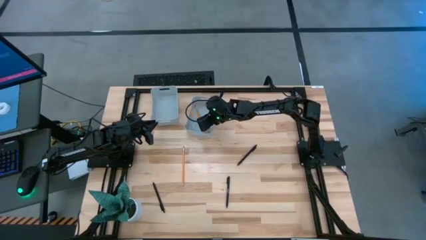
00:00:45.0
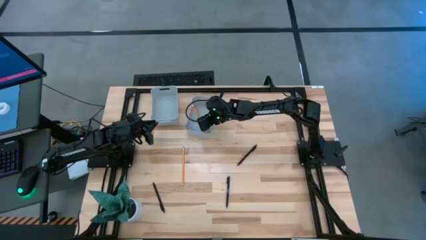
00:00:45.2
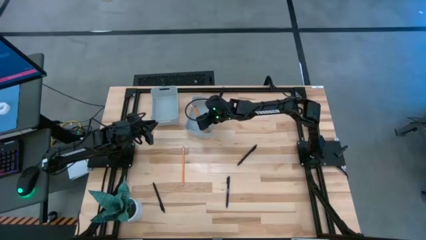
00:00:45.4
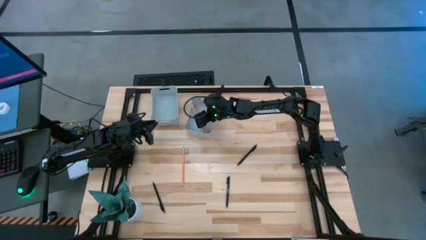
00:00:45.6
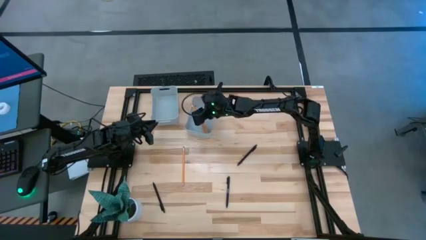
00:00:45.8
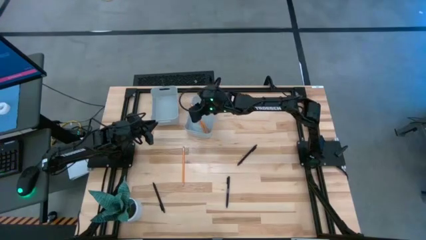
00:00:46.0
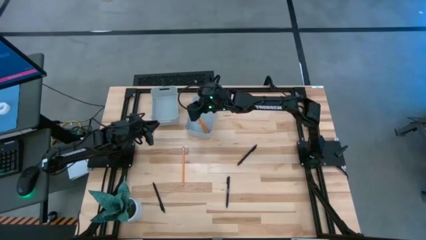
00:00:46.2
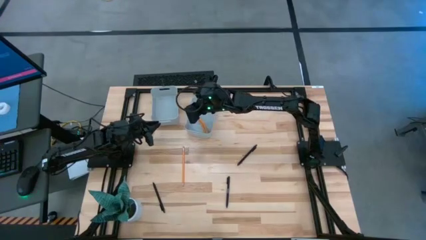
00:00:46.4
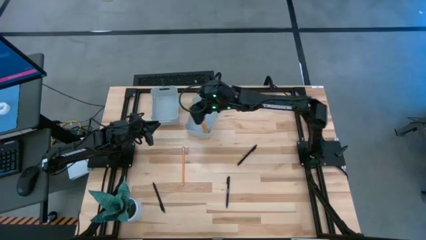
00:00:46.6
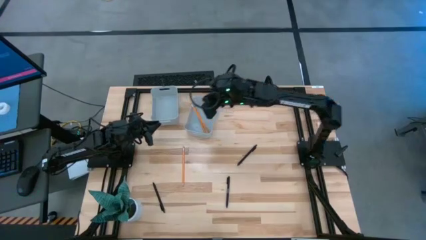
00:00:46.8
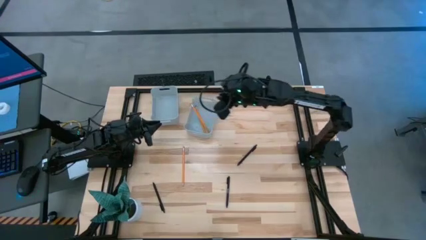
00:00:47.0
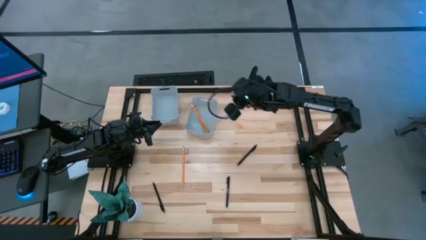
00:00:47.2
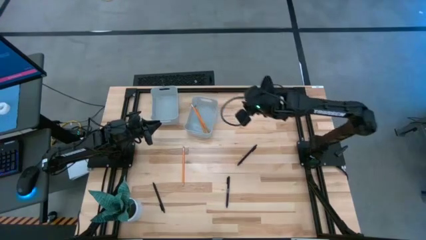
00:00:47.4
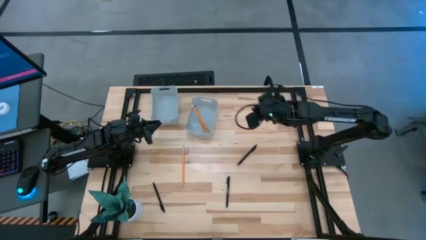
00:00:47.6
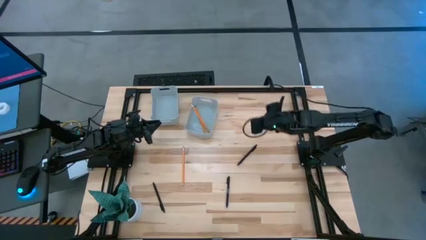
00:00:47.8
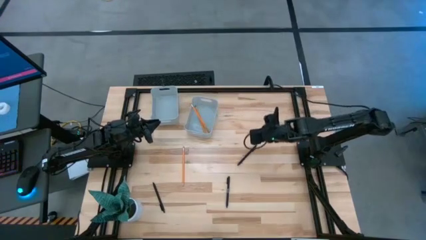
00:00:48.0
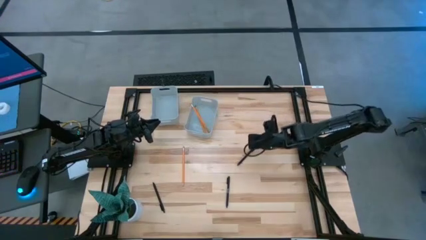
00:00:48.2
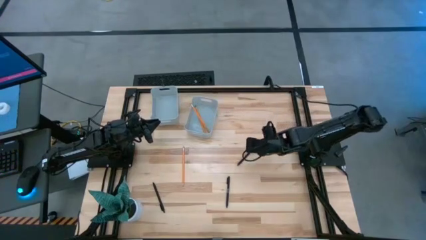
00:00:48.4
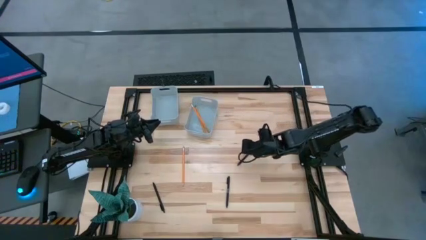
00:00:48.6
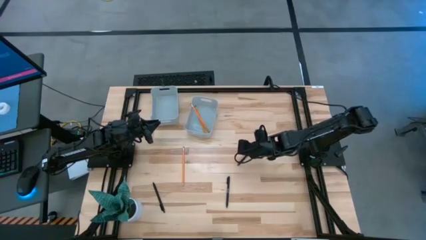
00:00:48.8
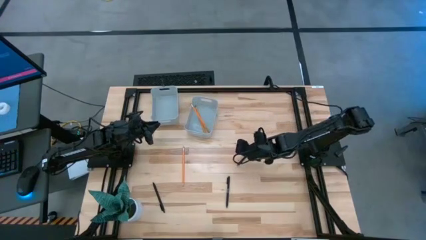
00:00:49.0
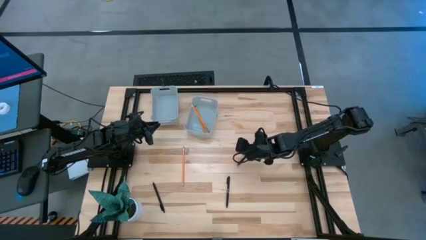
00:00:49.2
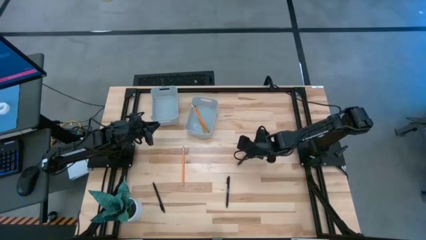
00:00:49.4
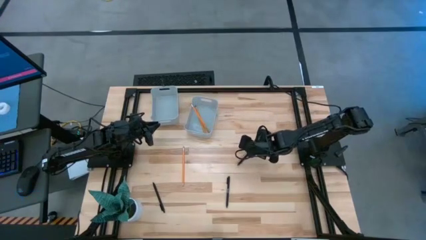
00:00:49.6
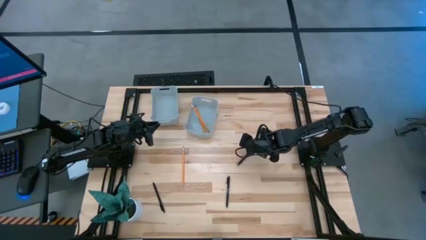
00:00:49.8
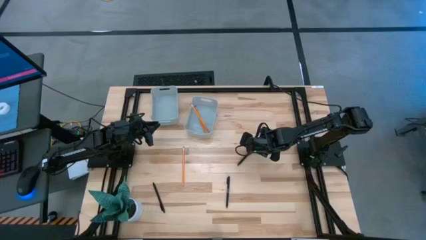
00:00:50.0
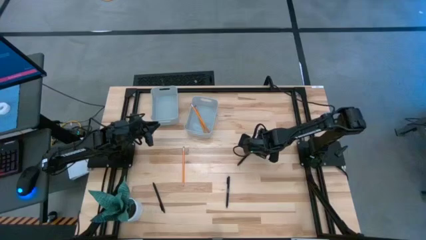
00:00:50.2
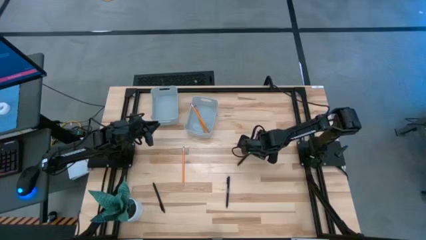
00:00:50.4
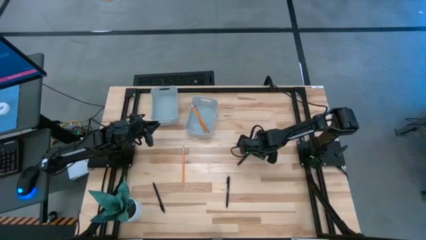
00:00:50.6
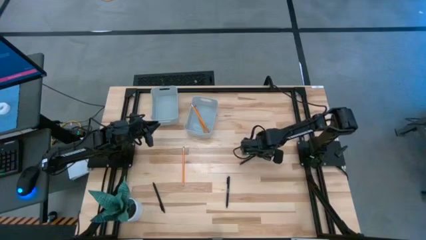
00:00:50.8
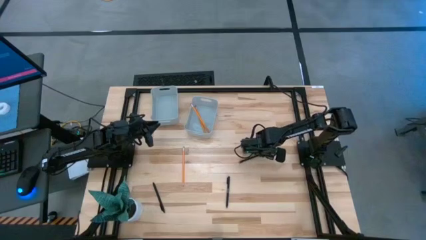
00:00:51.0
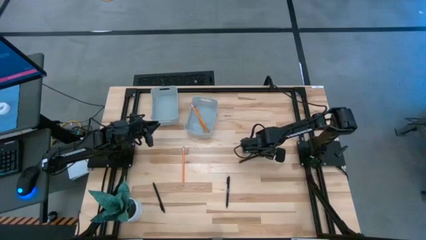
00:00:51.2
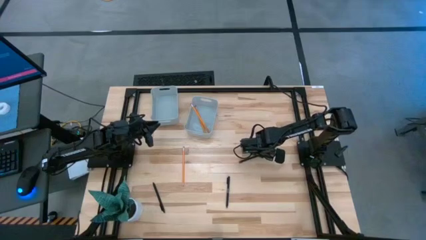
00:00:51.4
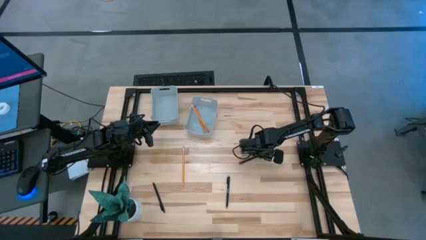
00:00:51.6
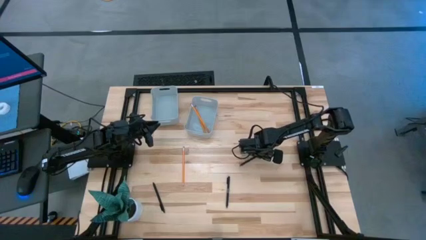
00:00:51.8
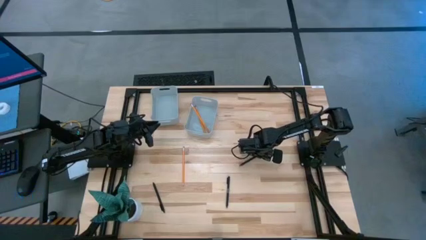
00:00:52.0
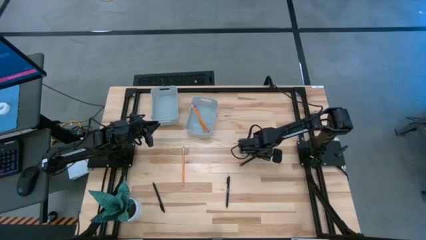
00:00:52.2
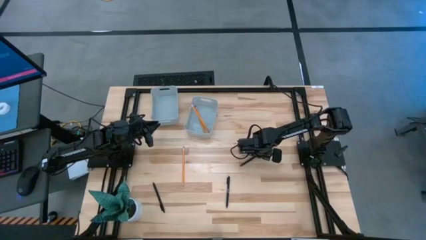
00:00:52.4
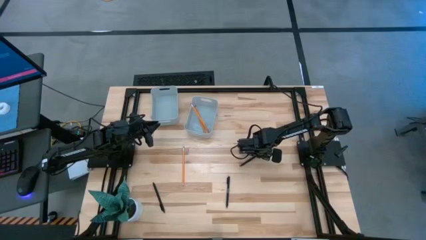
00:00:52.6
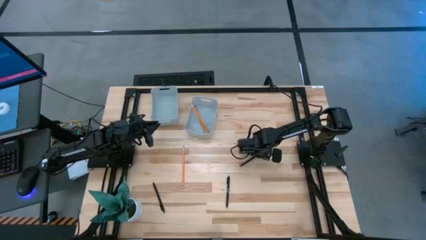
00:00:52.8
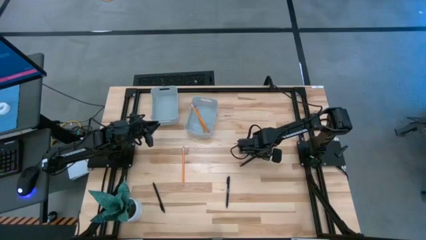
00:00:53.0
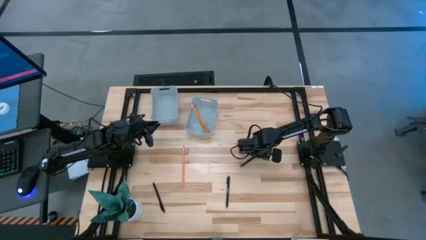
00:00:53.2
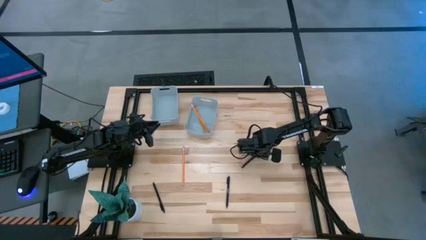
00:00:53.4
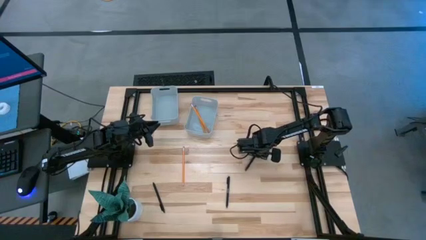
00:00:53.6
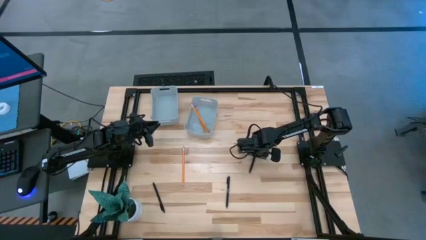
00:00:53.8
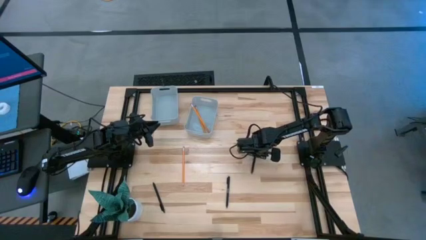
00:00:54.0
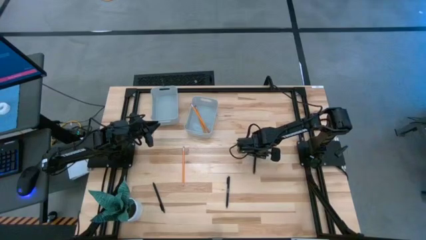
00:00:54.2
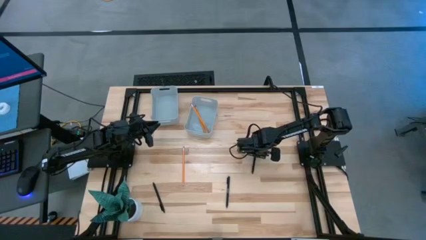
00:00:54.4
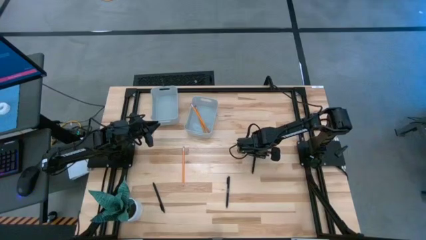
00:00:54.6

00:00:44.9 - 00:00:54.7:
Task: Sort pens & pencils
Put the top black pen into the left gray bin

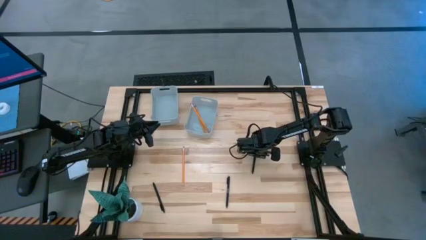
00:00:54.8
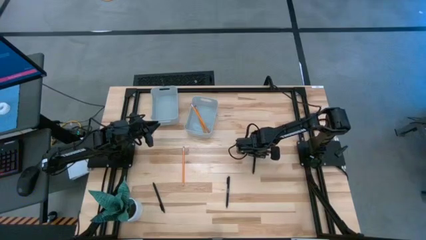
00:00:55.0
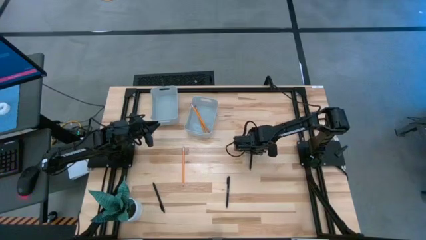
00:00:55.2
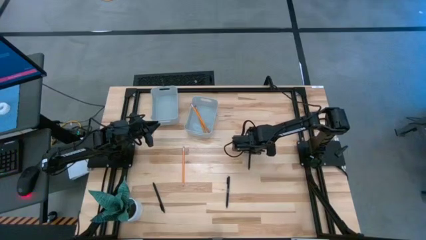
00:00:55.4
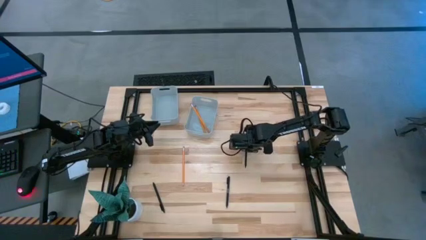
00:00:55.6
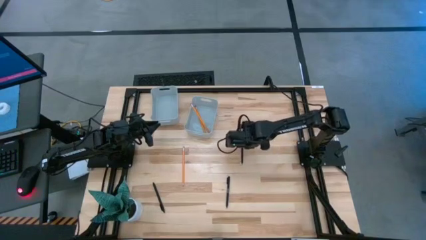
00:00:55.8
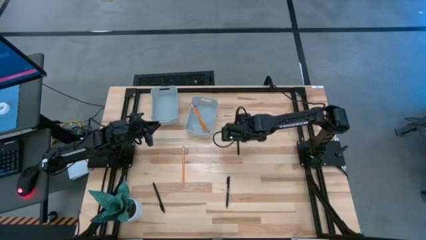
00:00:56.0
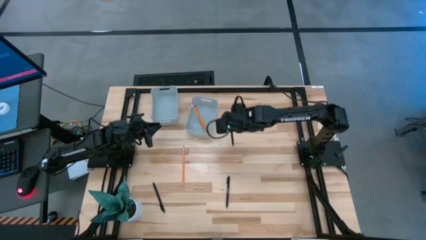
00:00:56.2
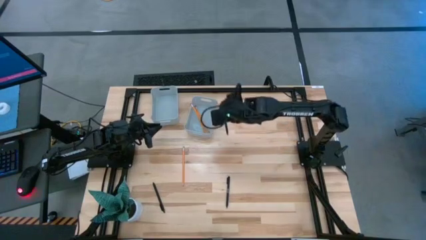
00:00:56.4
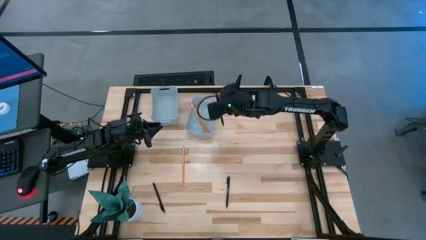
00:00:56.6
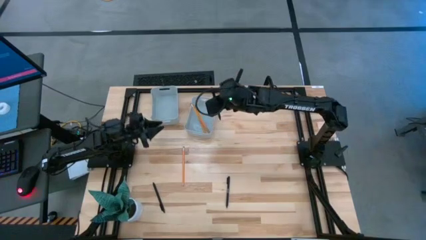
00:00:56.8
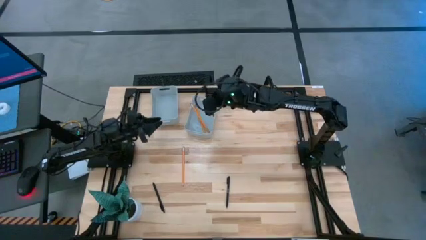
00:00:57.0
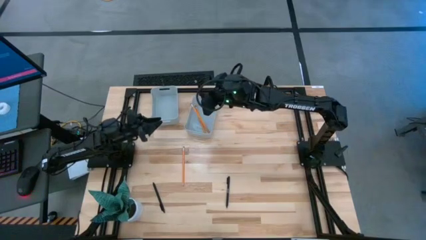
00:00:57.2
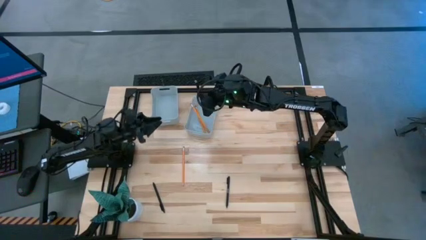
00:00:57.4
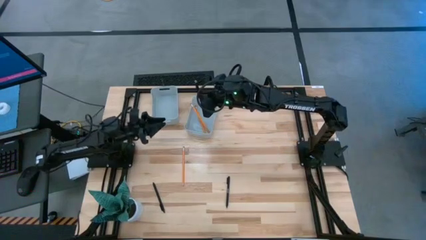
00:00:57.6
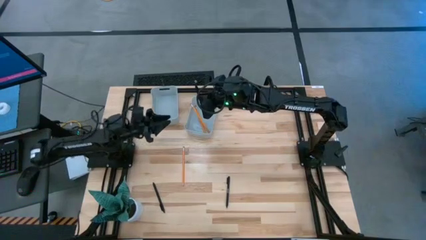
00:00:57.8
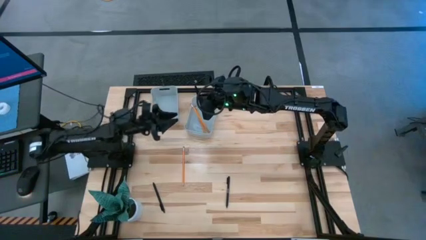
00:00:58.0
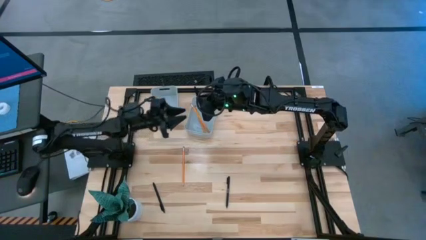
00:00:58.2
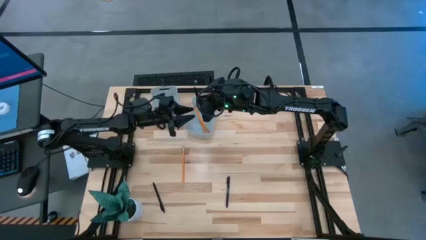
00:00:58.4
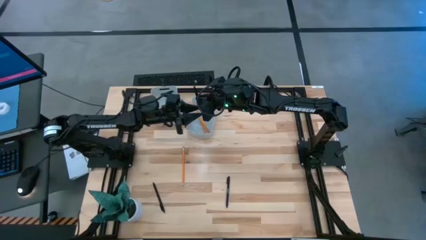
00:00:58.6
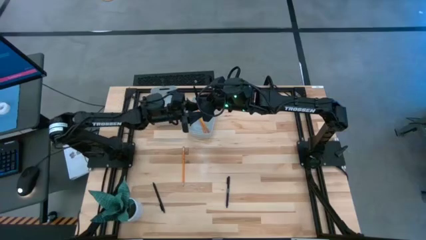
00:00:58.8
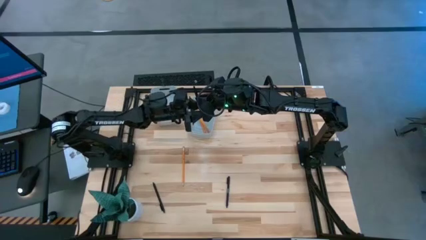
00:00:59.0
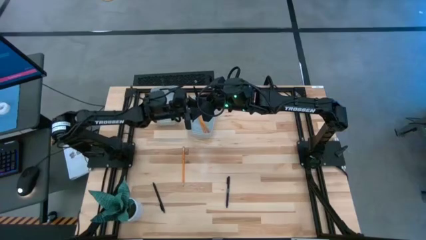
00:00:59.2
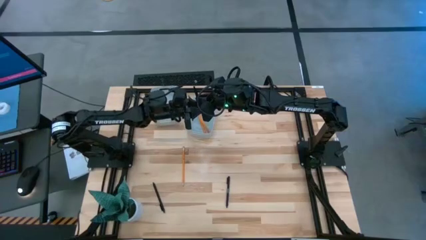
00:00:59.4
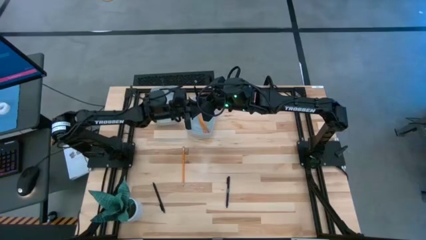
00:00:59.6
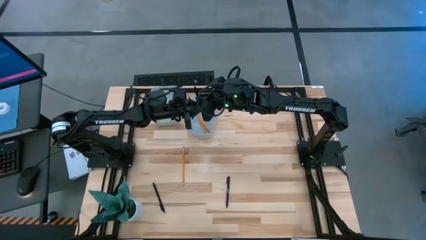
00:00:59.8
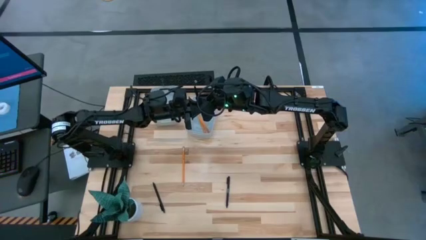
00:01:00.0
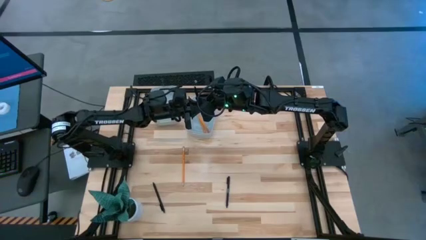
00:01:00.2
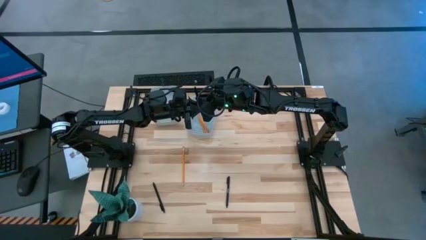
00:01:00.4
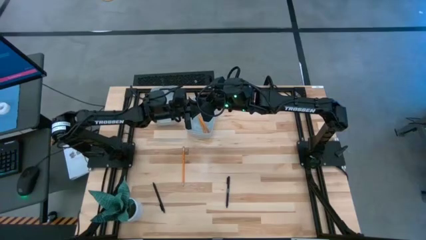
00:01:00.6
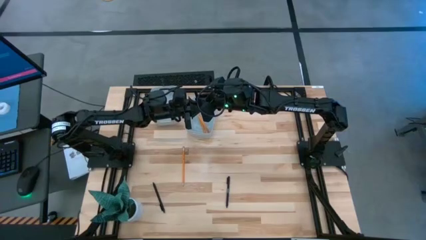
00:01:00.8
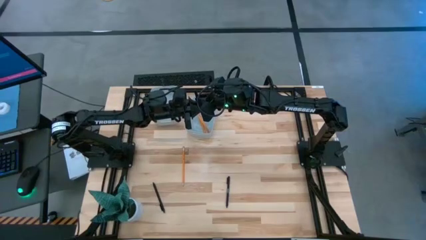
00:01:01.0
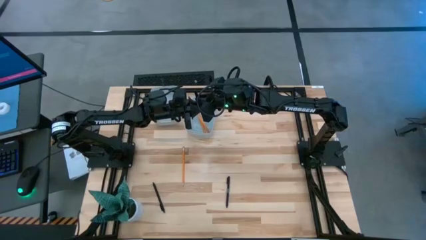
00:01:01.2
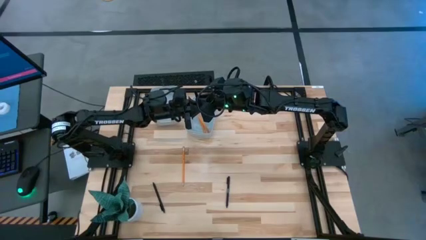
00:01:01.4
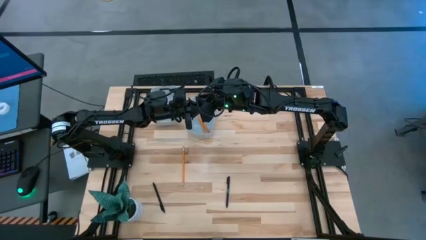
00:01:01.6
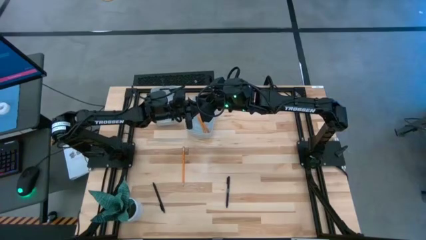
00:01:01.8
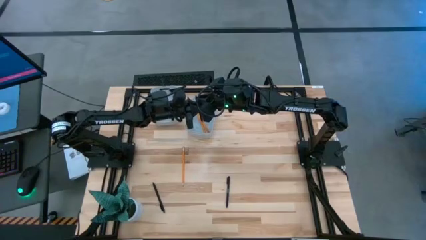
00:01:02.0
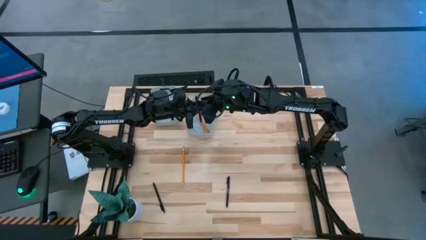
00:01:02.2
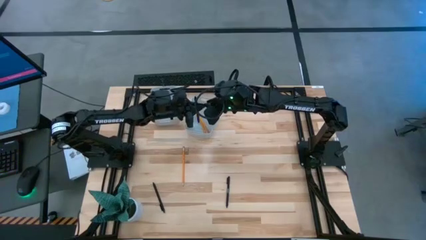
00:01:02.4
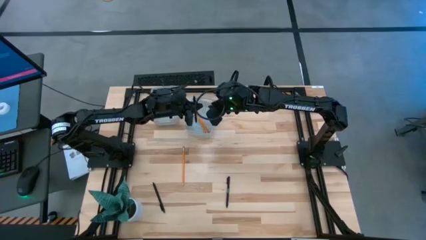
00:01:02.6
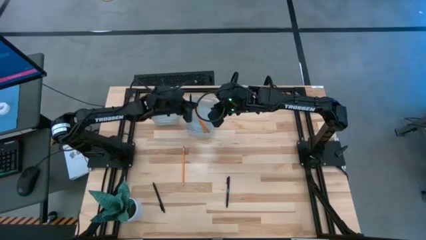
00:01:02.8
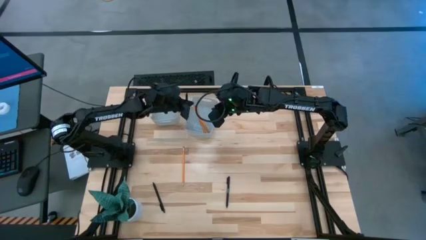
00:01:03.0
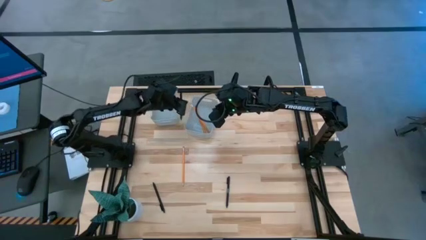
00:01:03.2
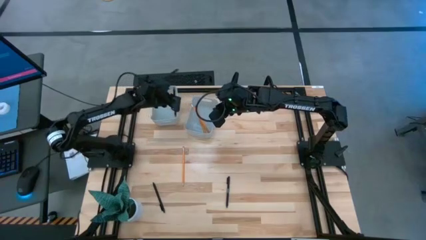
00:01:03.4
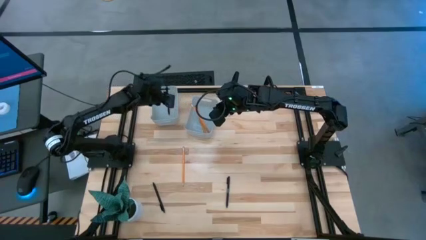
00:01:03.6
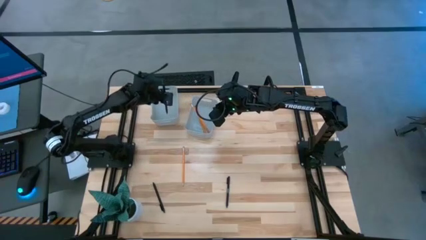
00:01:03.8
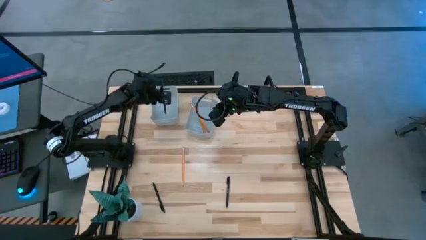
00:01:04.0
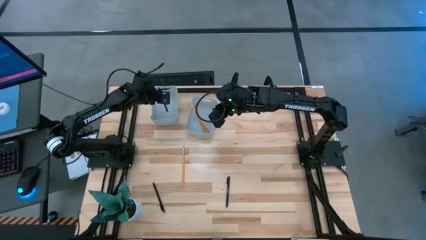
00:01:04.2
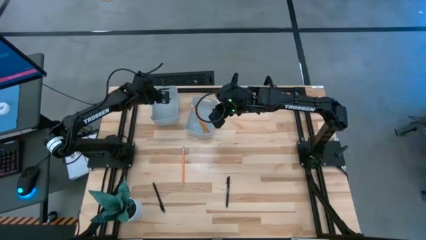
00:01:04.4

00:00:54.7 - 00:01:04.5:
Put the top black pen into the left gray bin
